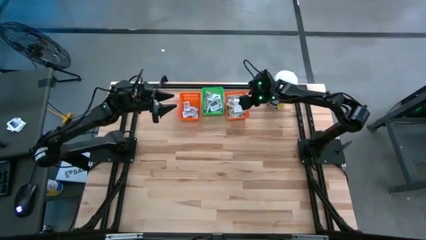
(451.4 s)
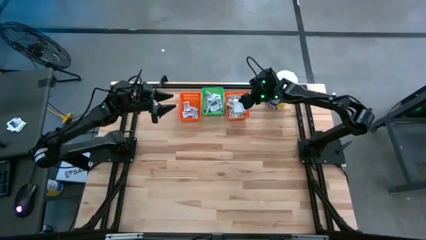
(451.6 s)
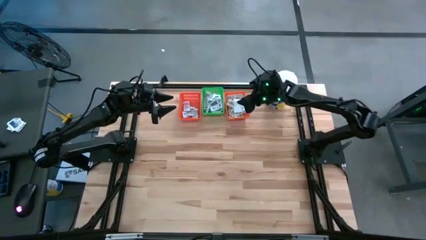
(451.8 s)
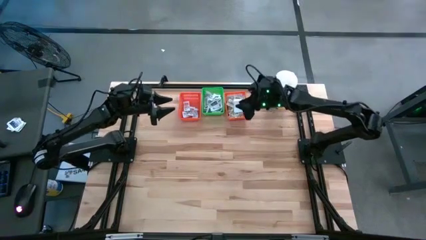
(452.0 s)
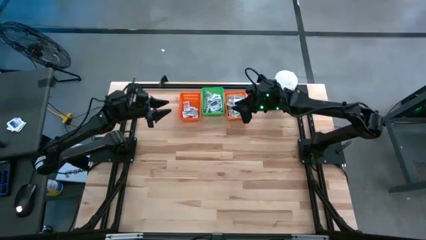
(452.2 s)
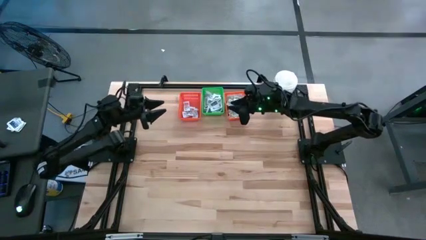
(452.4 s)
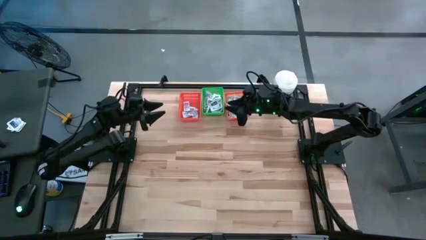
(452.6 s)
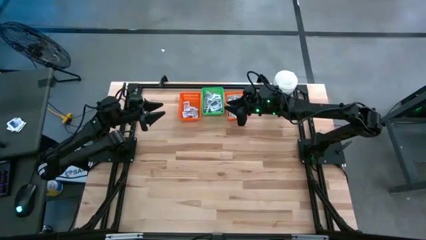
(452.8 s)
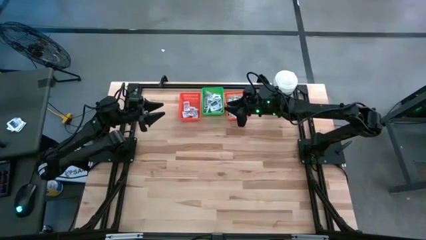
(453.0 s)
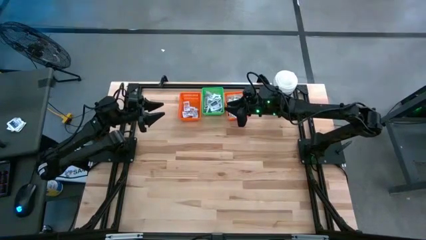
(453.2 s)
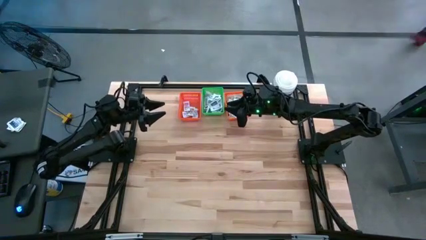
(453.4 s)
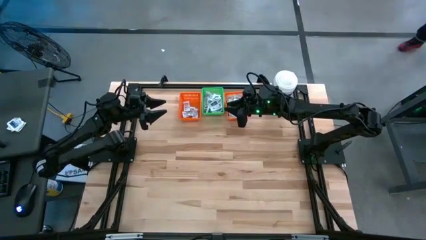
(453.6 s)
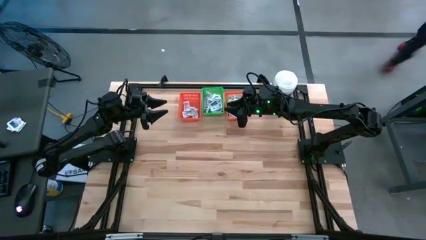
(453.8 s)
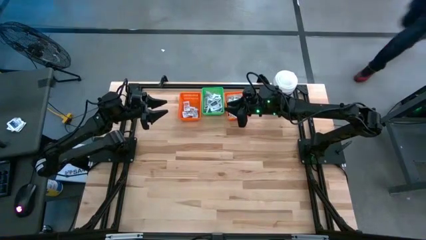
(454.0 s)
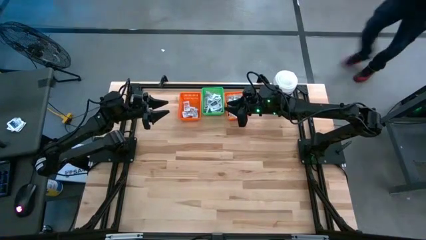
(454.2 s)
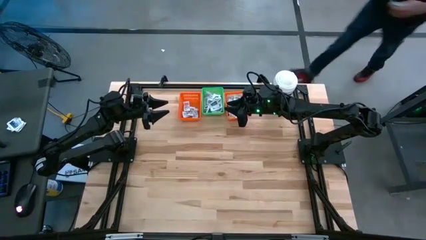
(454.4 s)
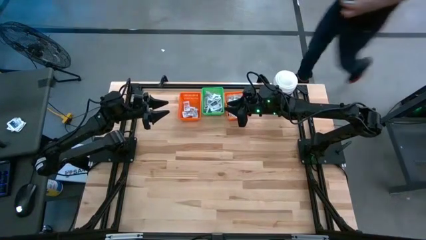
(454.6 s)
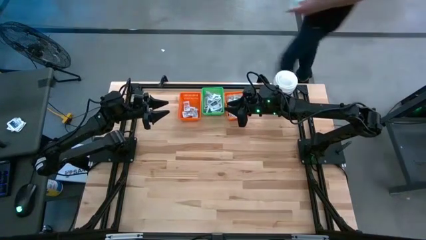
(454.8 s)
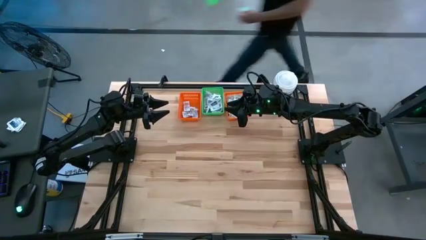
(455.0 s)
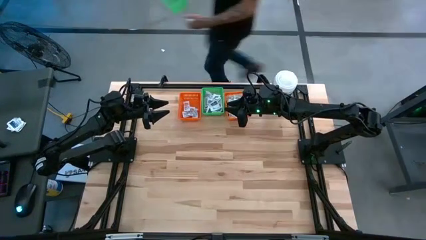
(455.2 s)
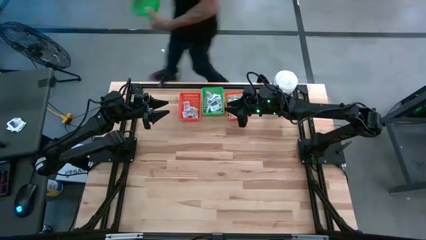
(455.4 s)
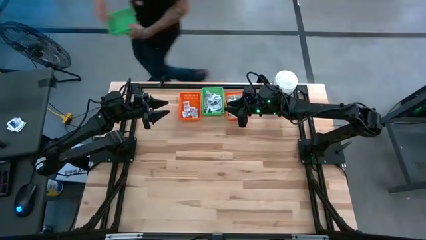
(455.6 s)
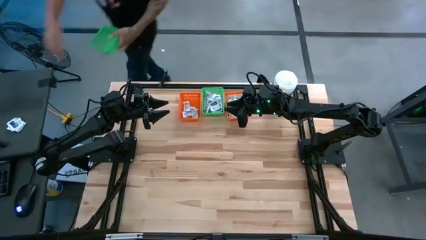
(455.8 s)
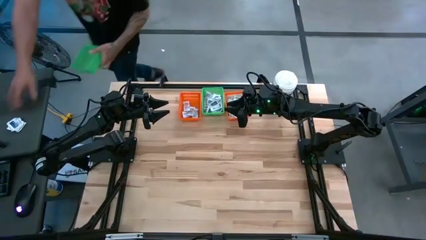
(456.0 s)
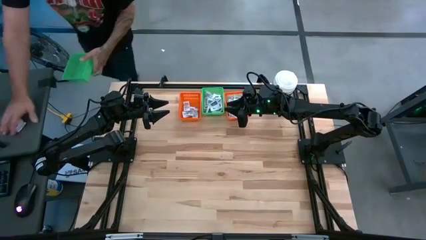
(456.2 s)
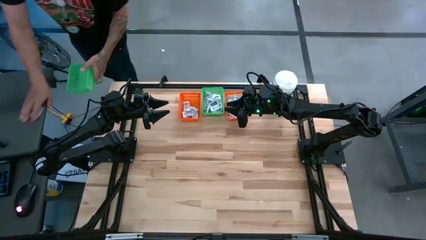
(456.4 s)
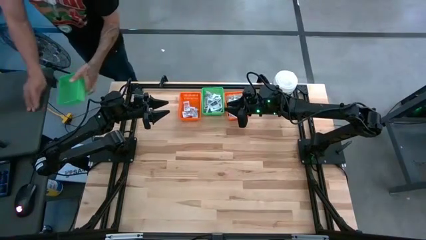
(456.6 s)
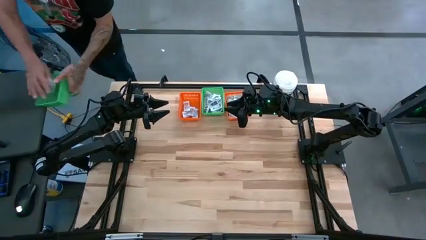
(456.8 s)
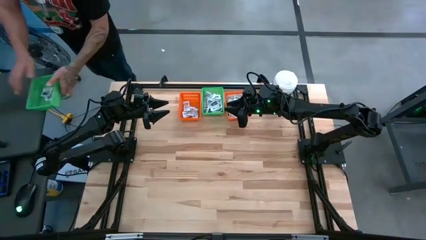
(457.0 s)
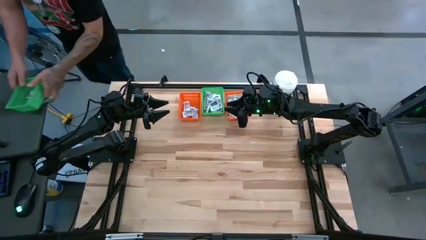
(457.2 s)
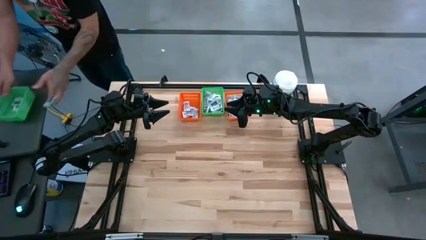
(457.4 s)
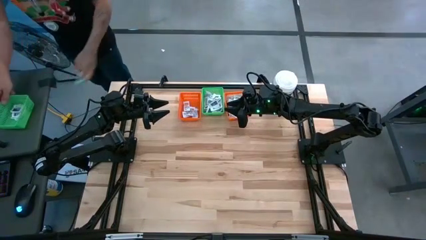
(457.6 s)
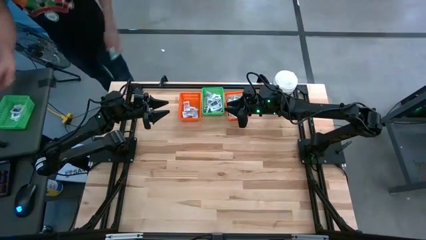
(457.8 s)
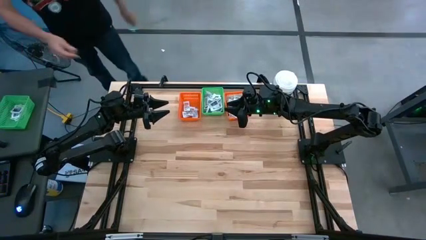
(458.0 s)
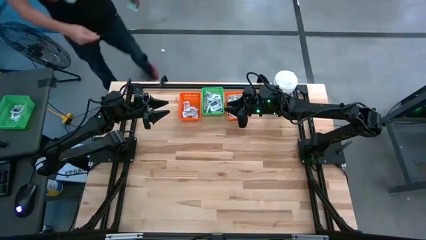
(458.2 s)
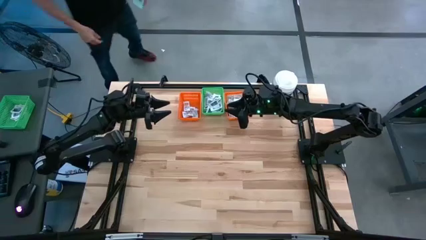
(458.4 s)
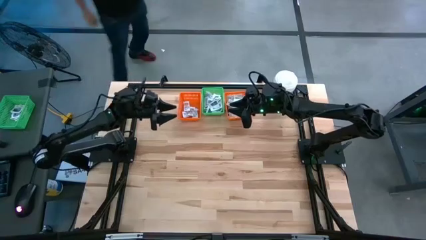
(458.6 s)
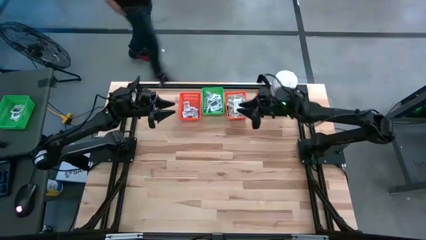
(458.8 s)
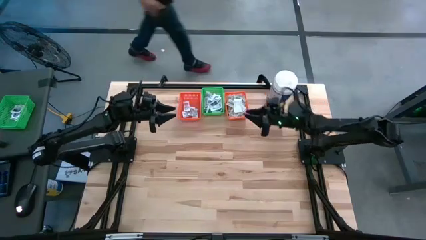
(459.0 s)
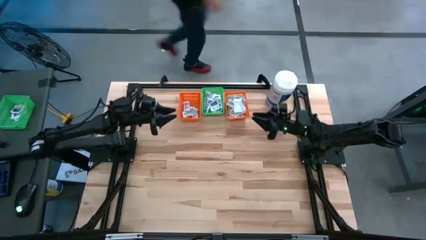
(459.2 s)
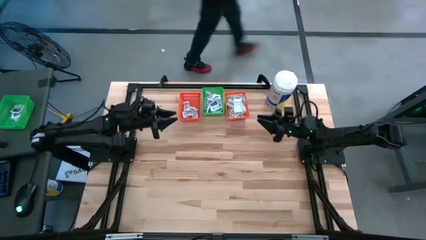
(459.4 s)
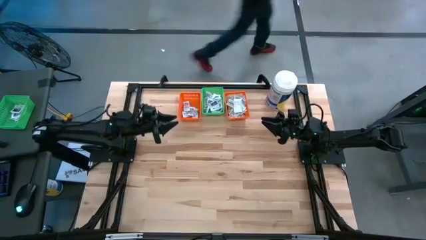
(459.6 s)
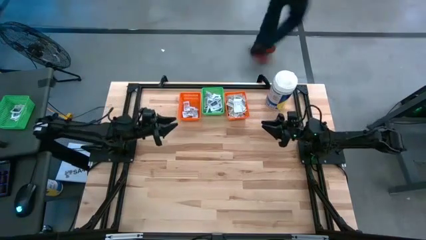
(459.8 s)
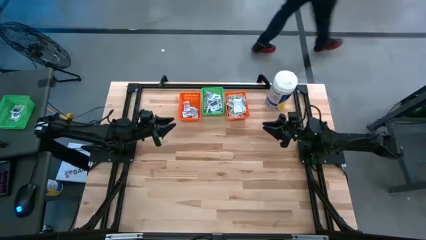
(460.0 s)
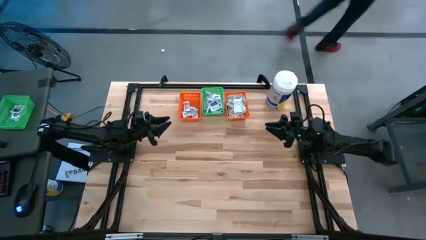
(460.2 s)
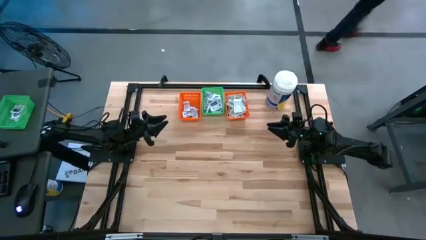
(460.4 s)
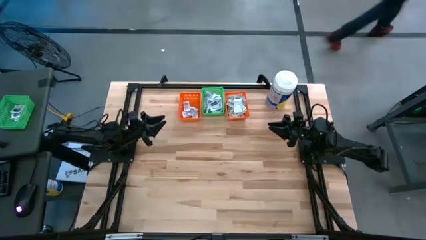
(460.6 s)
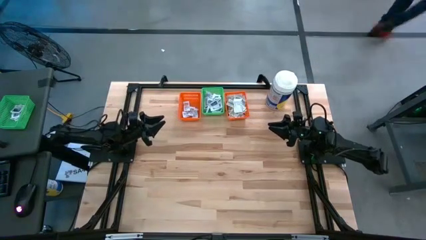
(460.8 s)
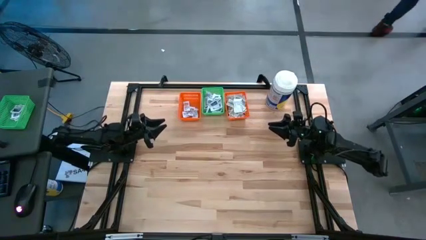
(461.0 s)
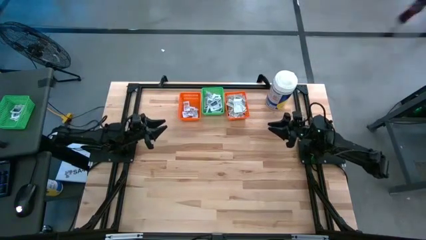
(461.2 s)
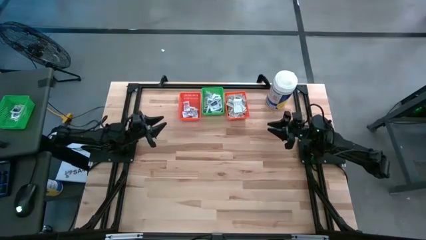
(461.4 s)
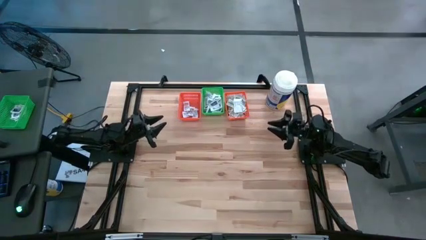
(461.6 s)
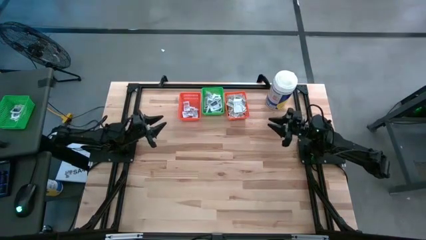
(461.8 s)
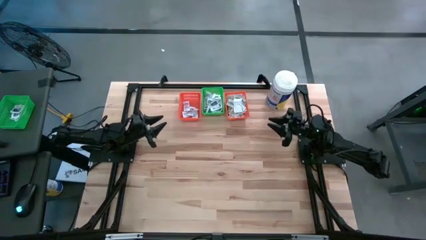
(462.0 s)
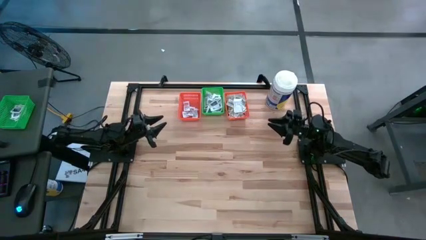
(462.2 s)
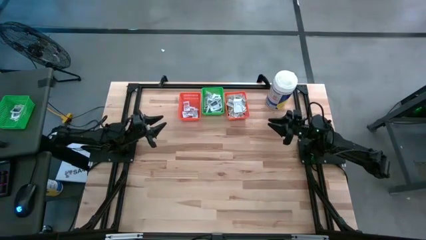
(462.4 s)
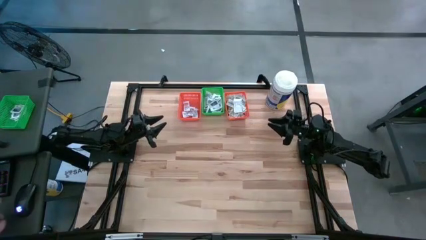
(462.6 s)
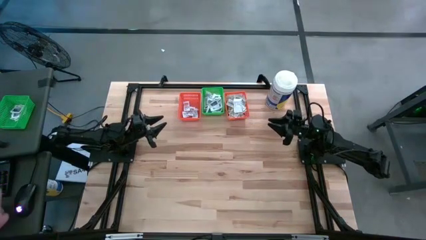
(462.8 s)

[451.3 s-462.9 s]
Task: Pick & Place First Aid Supplies
Return to Home Position
